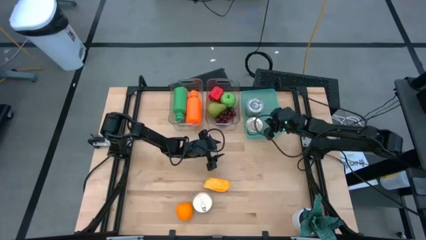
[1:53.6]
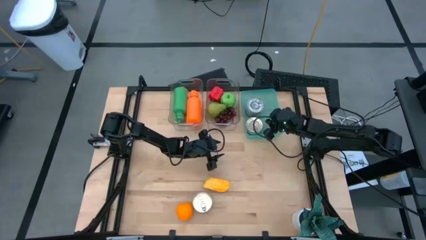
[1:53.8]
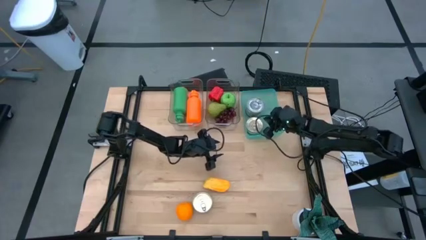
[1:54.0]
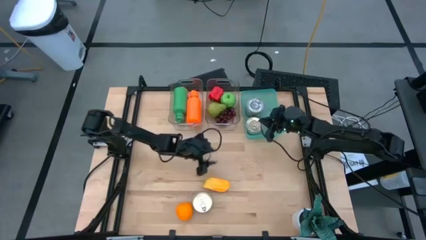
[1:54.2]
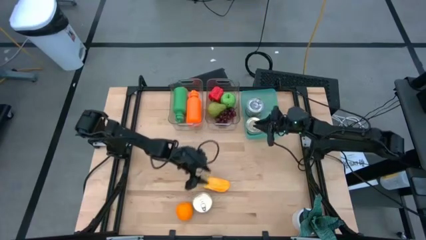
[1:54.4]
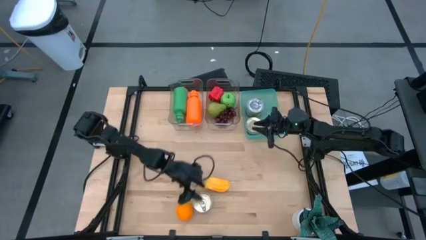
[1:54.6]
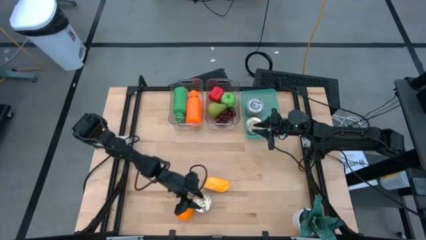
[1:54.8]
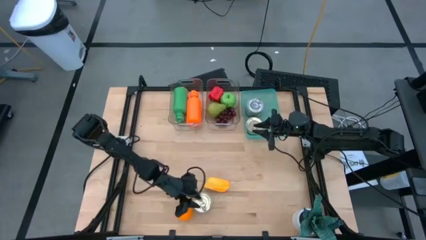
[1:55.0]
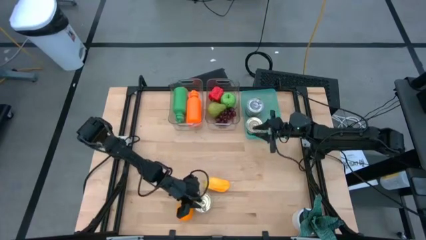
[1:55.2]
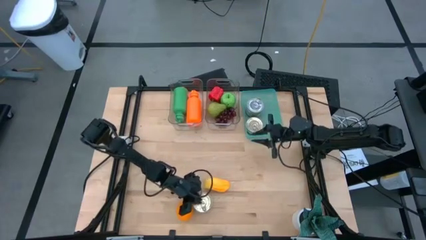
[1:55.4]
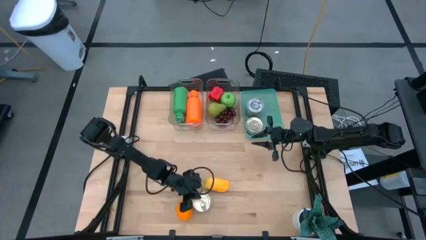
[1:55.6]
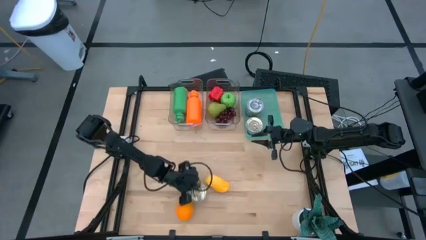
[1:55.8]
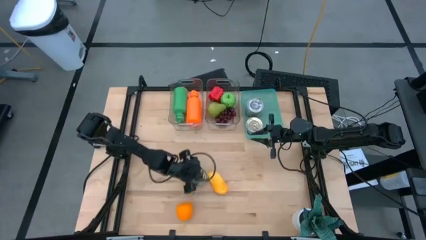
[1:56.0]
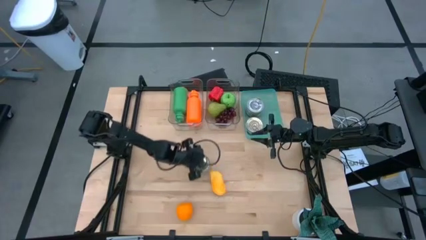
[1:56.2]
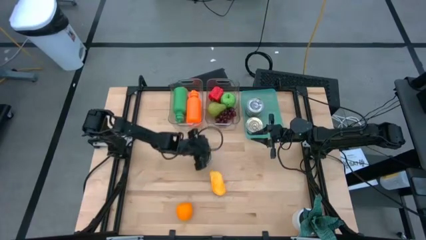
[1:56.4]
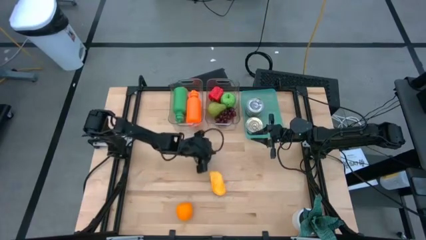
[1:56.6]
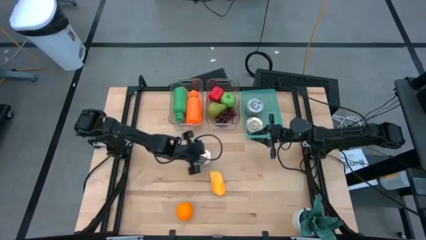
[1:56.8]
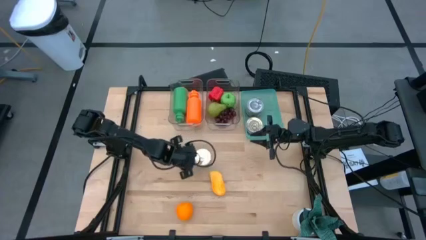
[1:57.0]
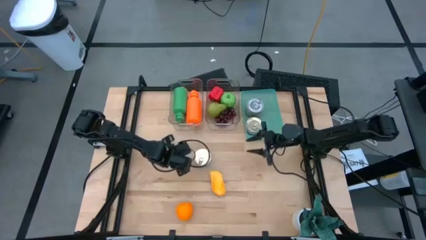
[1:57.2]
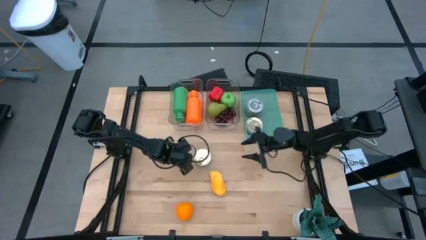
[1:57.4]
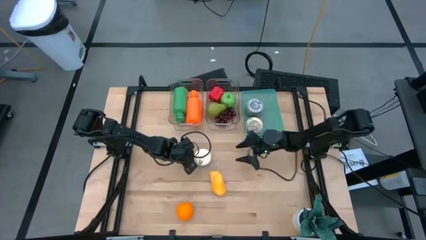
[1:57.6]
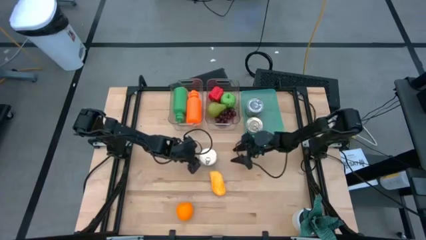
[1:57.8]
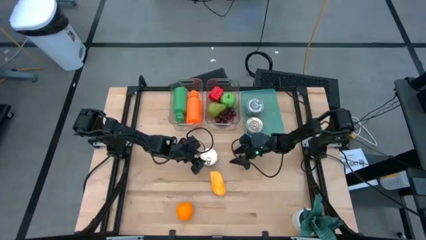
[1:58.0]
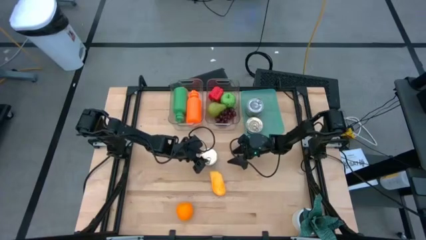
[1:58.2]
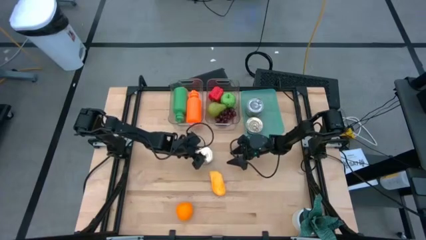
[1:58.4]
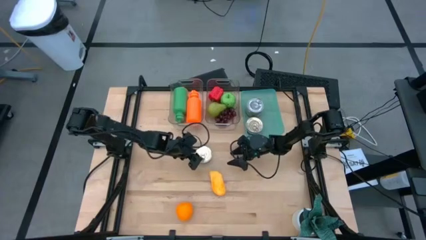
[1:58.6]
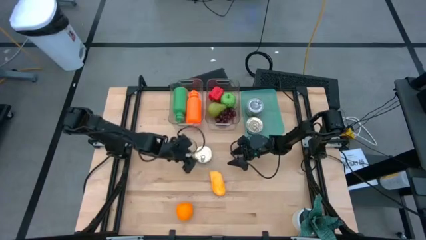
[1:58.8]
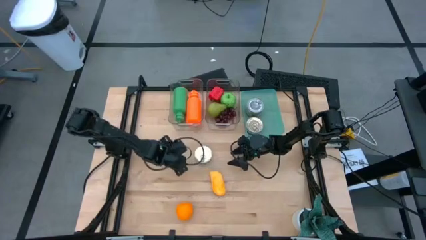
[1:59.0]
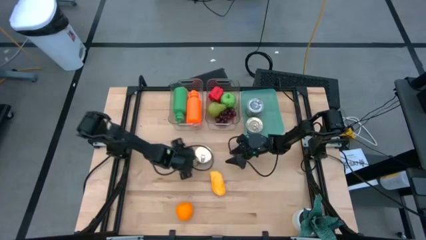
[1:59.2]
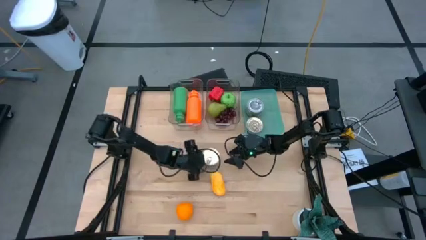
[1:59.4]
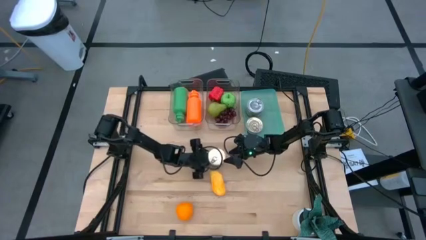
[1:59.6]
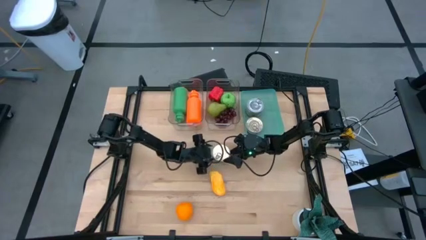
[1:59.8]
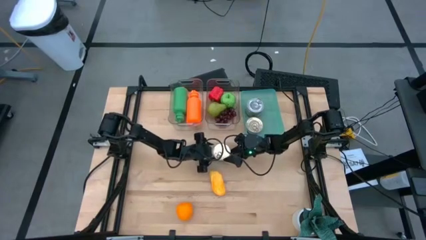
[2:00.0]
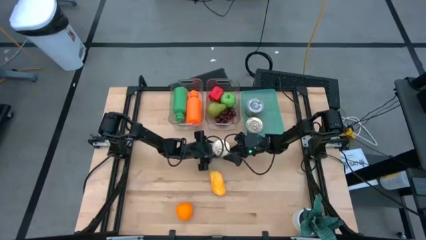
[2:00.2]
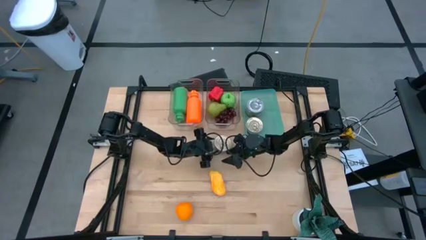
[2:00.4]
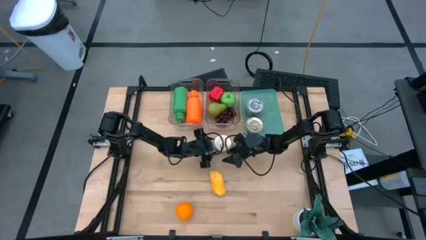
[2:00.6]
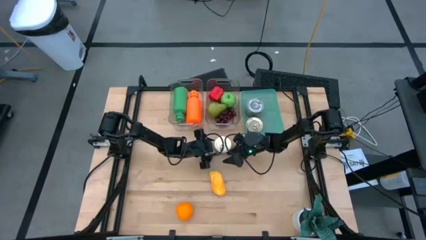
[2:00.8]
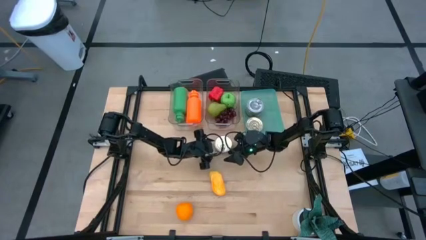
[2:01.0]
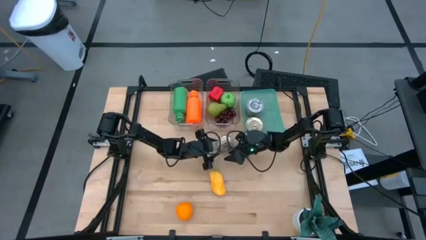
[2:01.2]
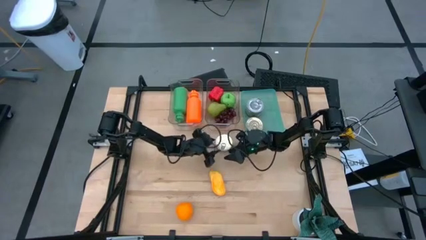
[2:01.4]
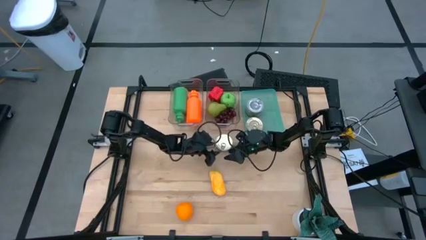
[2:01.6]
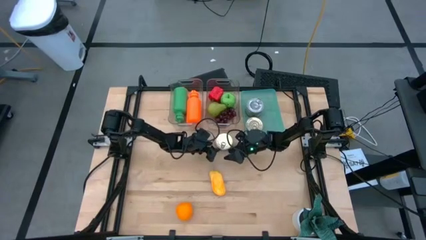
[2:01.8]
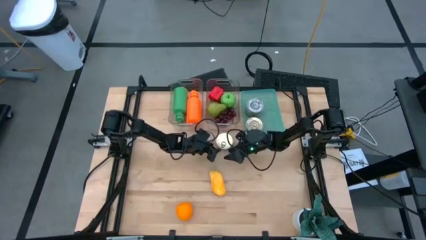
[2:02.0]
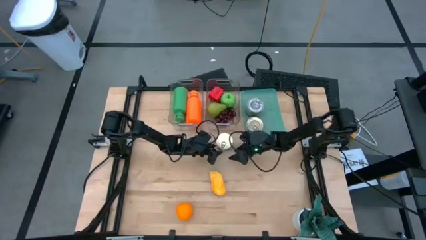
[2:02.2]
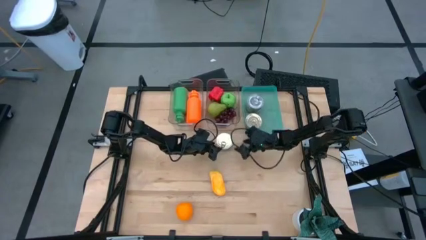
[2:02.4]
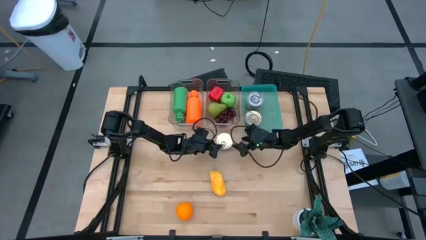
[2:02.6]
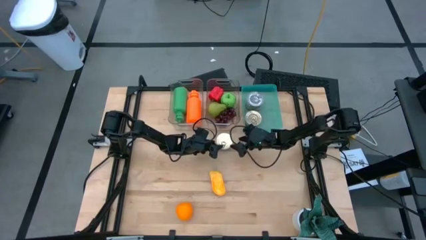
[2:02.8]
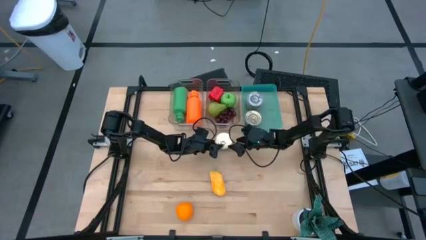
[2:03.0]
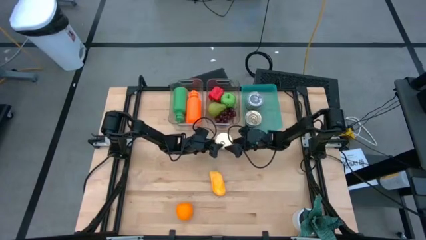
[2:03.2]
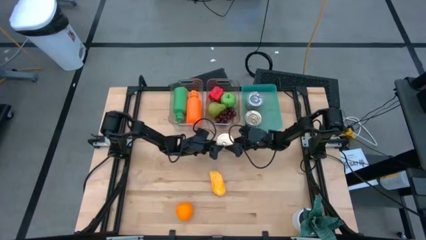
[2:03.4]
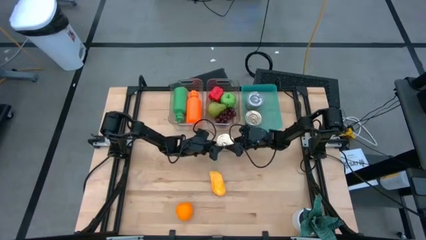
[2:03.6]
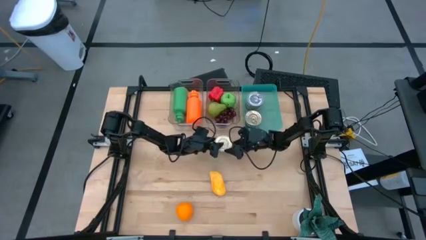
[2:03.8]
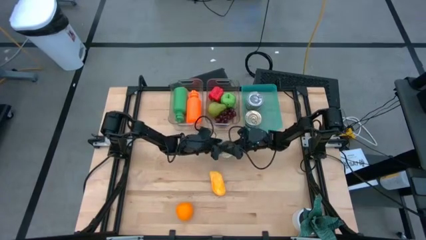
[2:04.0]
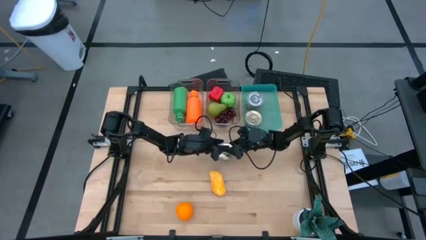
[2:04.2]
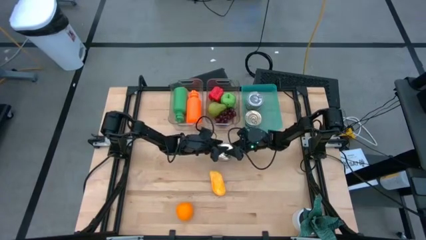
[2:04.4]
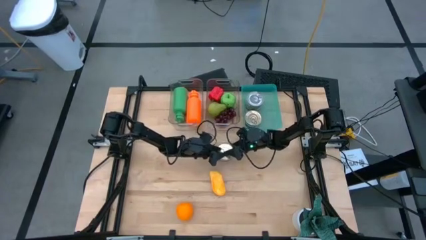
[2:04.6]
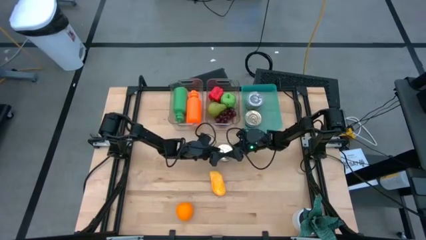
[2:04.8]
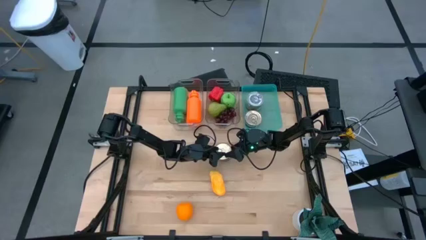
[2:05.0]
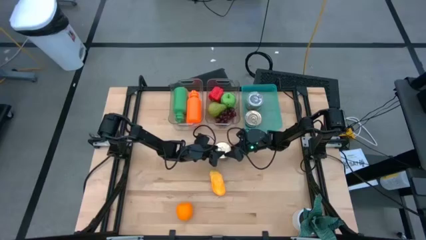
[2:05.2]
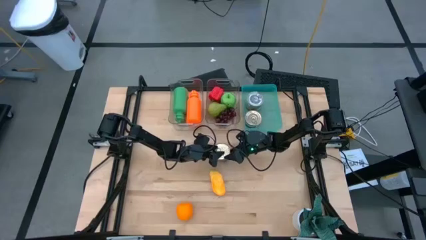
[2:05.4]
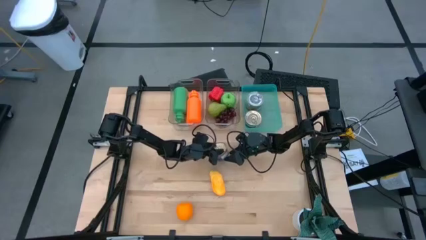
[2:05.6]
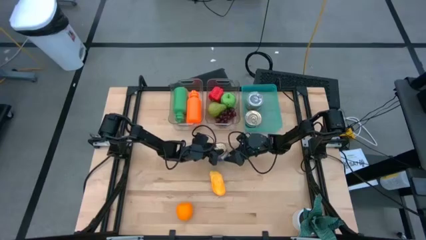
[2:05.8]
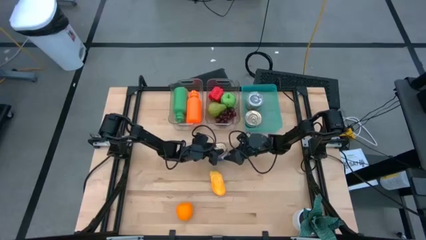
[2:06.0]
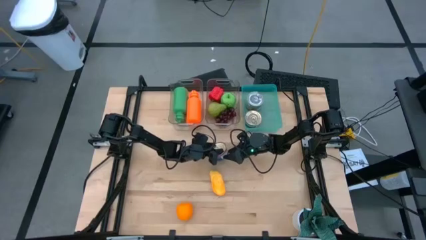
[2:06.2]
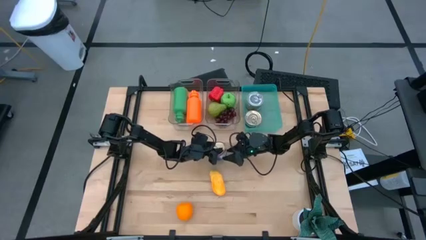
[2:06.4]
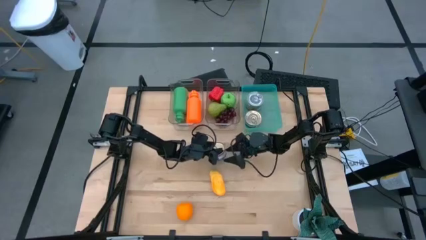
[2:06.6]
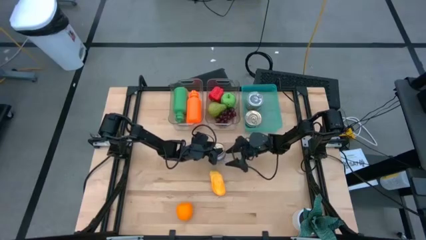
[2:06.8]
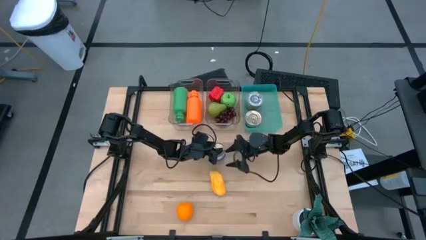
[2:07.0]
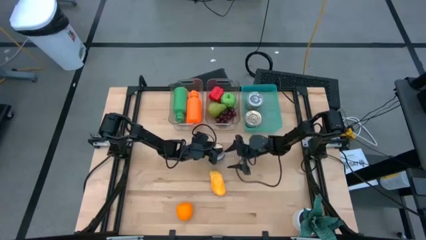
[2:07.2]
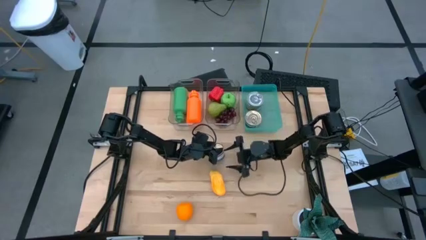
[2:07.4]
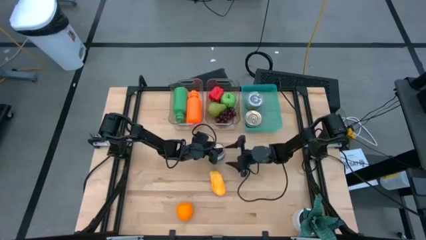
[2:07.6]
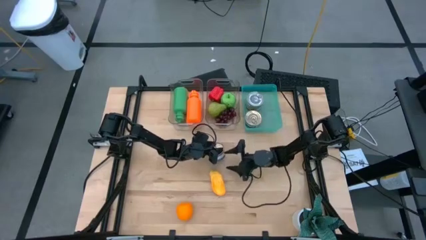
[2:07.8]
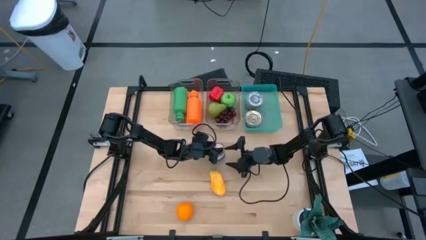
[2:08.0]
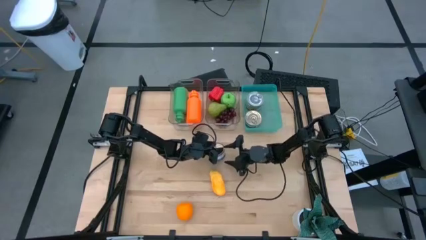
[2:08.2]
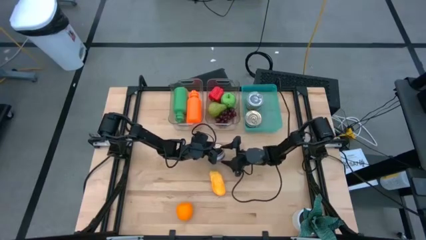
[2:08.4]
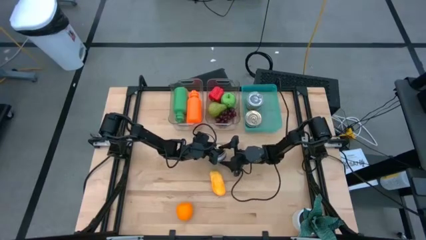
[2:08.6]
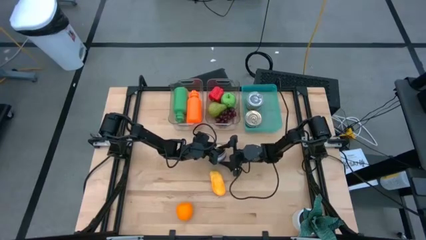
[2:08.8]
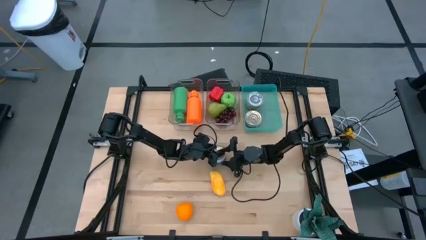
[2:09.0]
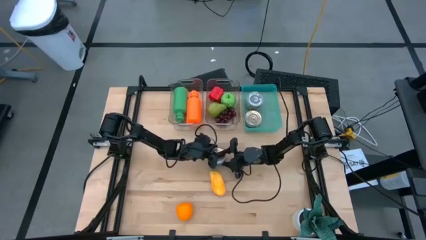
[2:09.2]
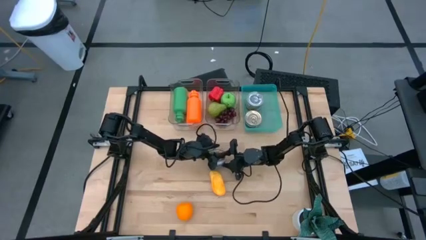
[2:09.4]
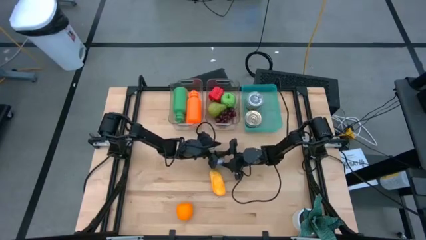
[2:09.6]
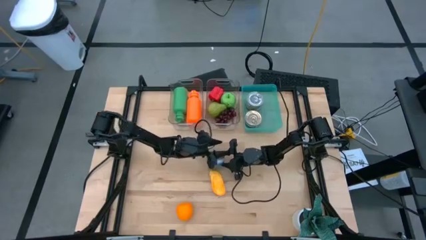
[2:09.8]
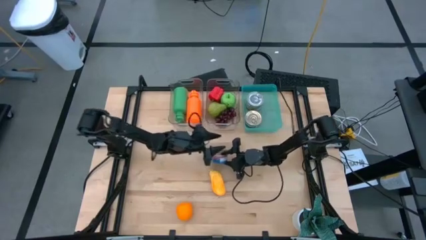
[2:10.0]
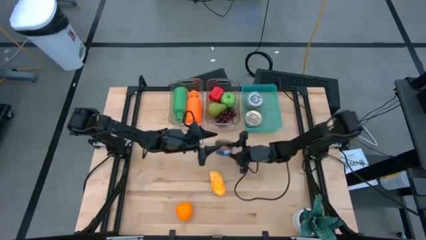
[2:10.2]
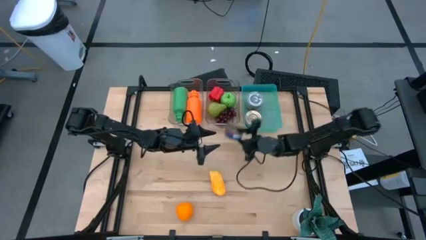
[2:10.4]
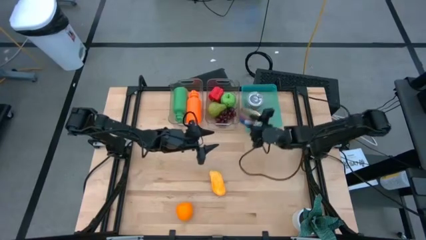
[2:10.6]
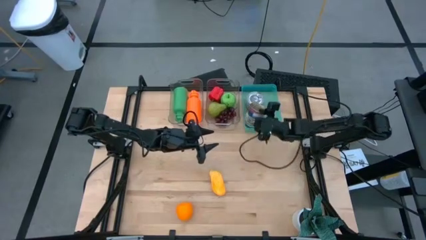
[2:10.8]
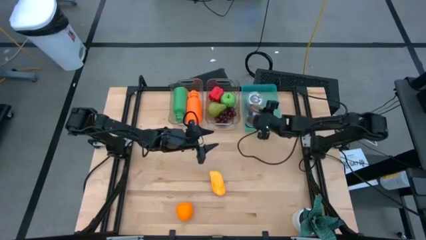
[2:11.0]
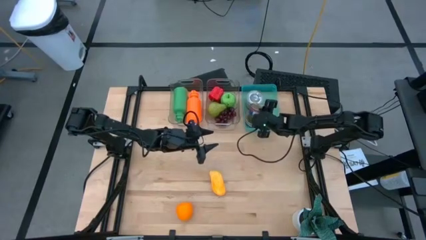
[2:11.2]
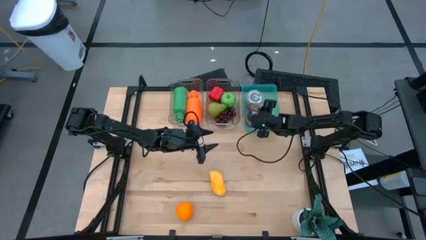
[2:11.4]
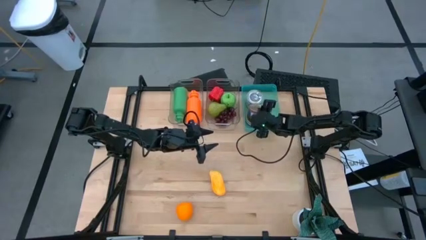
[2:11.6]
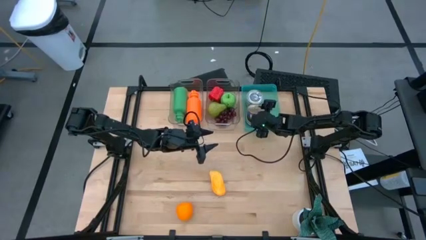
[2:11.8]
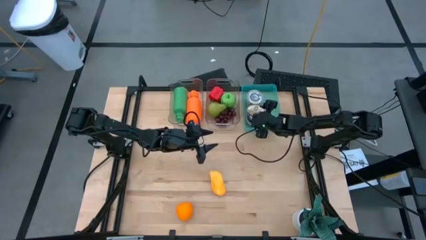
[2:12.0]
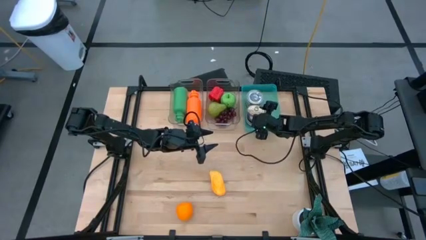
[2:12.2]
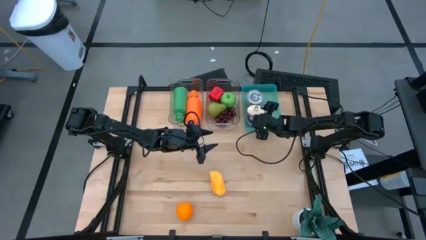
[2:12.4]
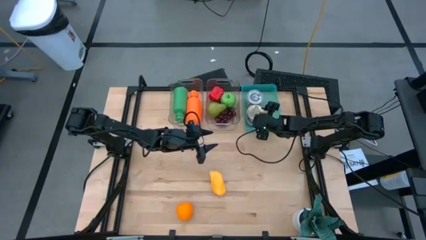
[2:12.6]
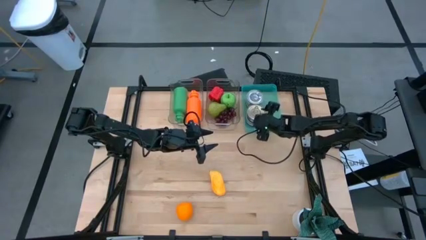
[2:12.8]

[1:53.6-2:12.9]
Task: Pick & Place Food Item
Put the blue tuna can into the green bin
